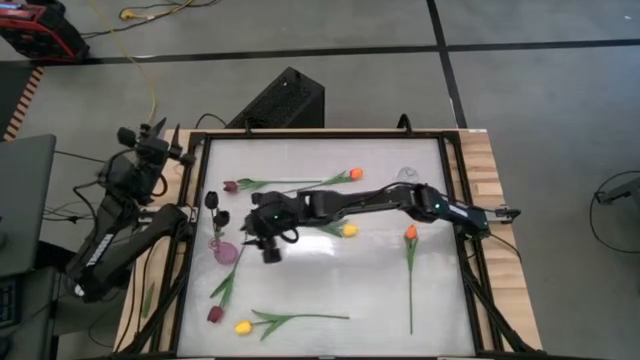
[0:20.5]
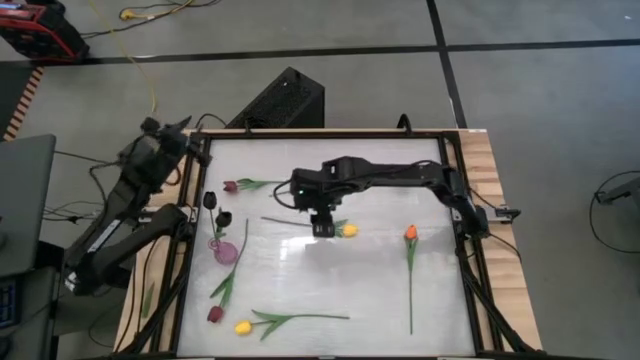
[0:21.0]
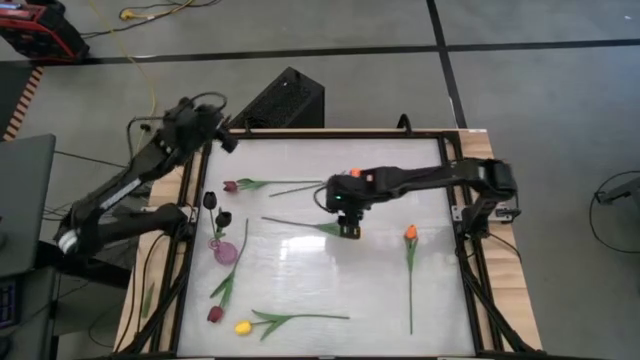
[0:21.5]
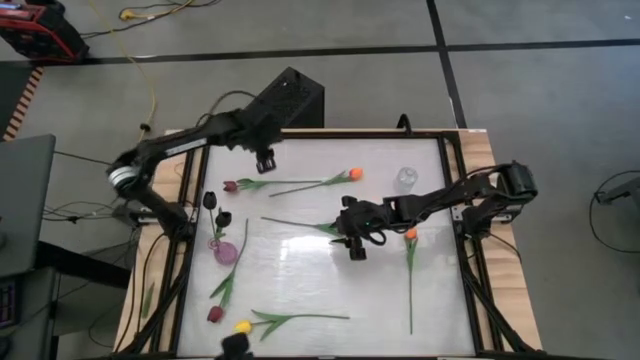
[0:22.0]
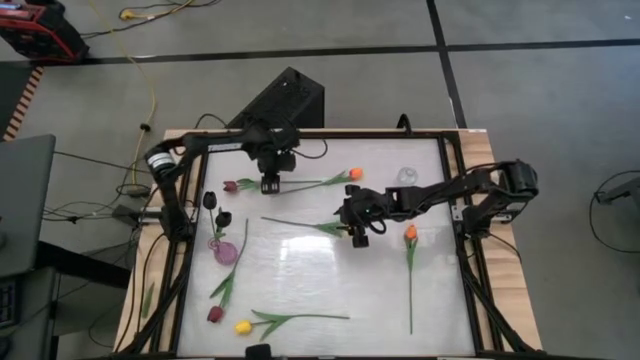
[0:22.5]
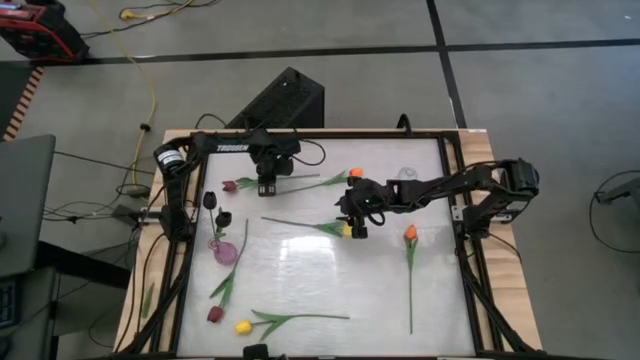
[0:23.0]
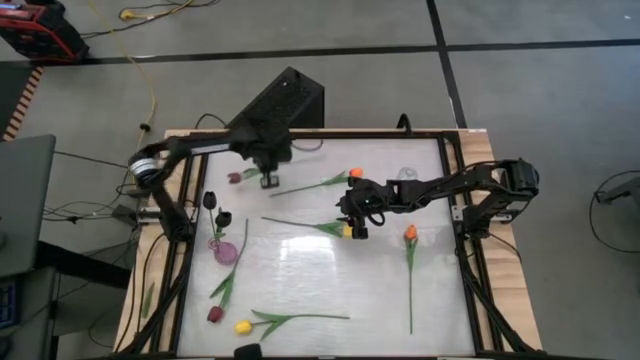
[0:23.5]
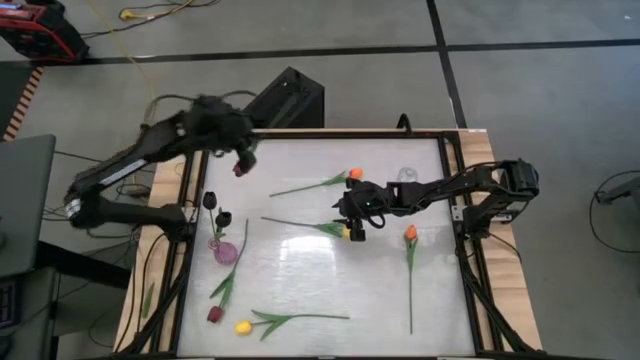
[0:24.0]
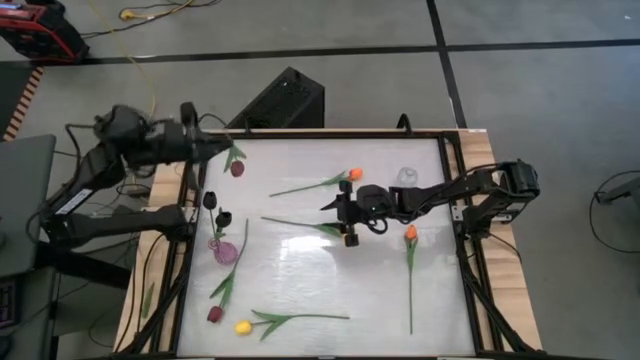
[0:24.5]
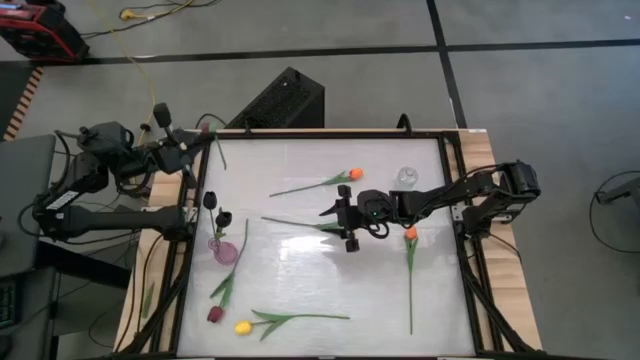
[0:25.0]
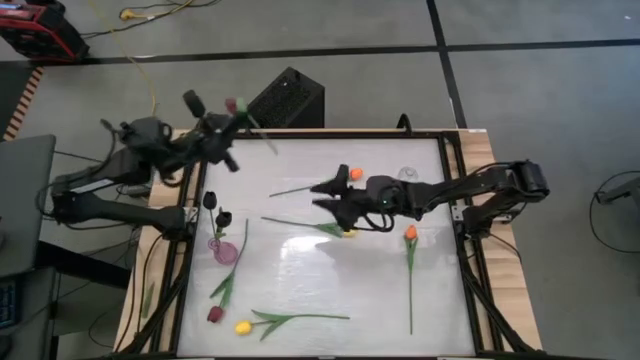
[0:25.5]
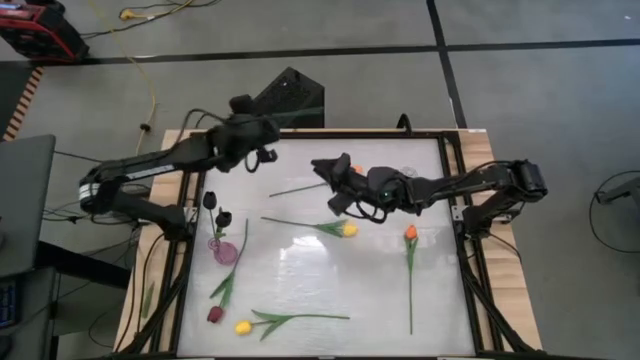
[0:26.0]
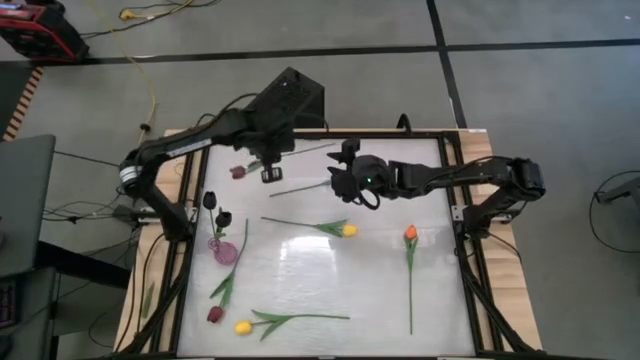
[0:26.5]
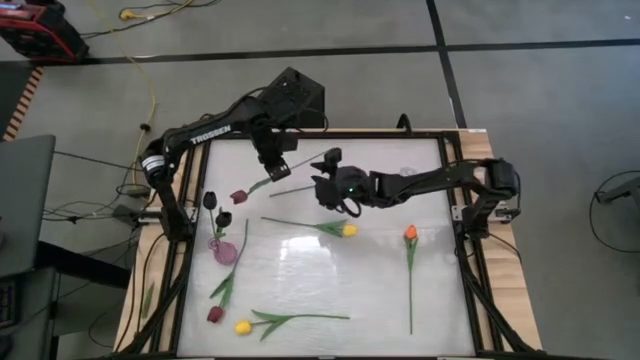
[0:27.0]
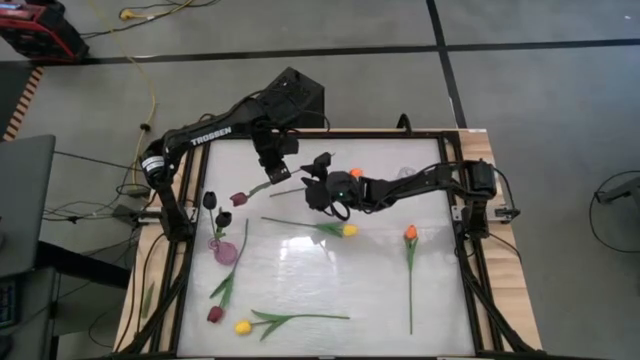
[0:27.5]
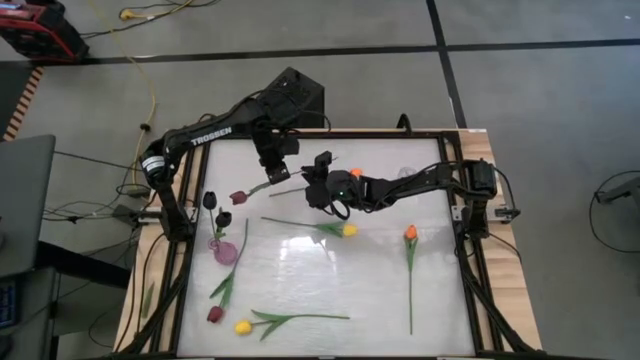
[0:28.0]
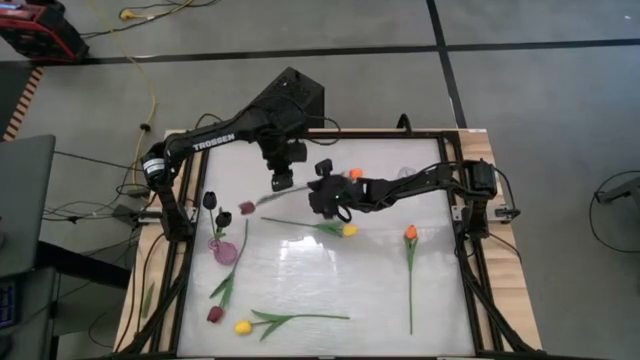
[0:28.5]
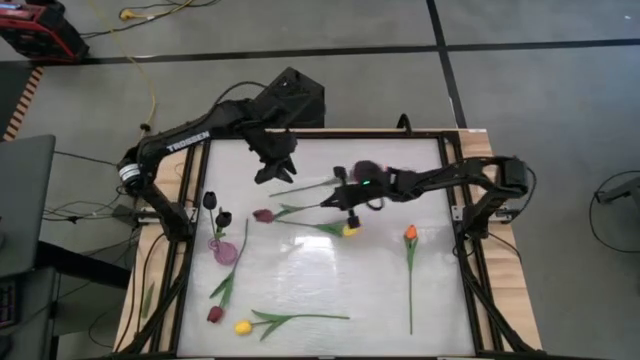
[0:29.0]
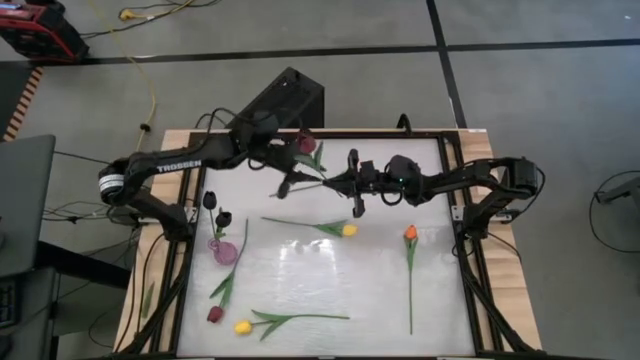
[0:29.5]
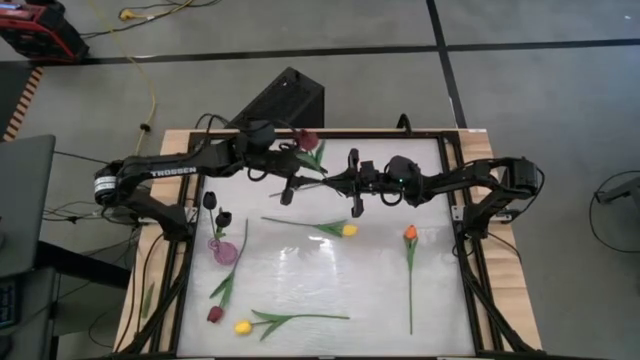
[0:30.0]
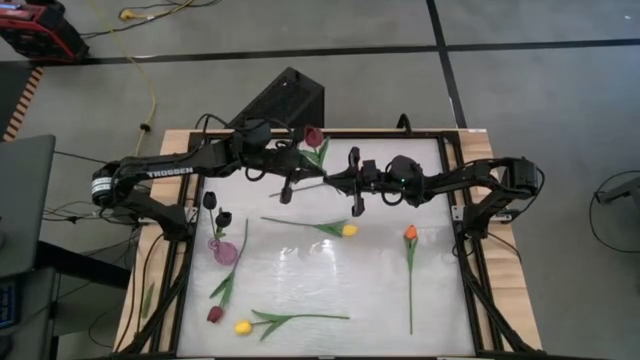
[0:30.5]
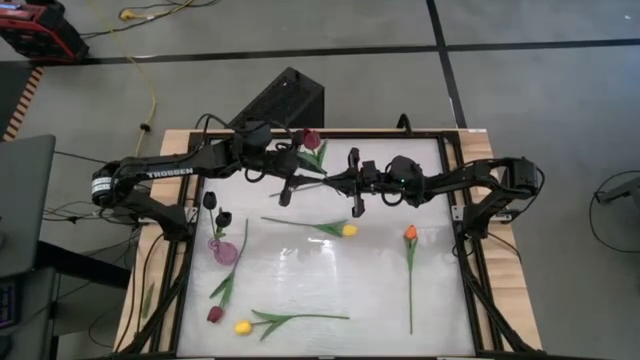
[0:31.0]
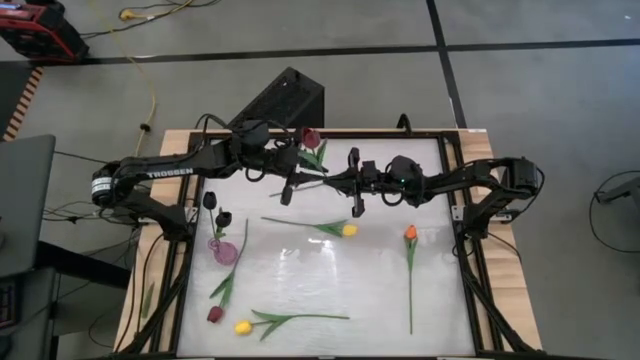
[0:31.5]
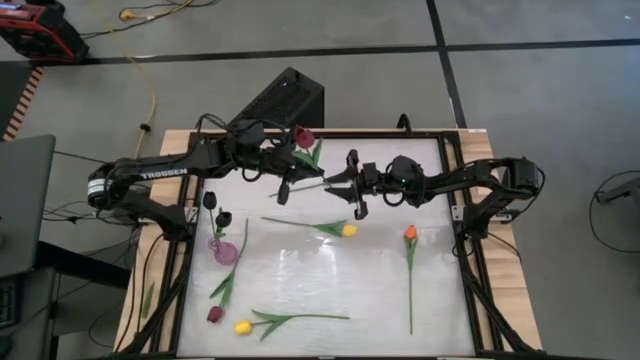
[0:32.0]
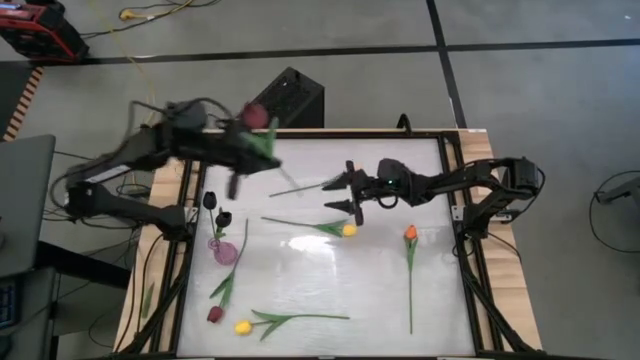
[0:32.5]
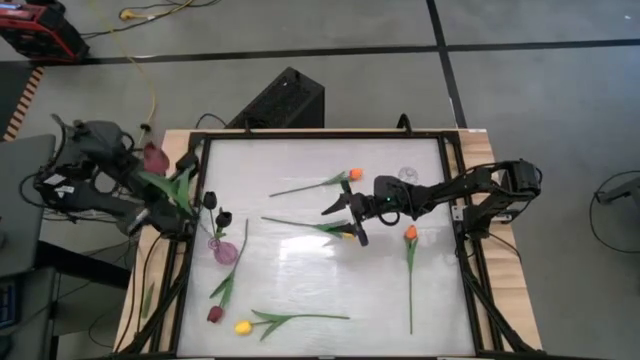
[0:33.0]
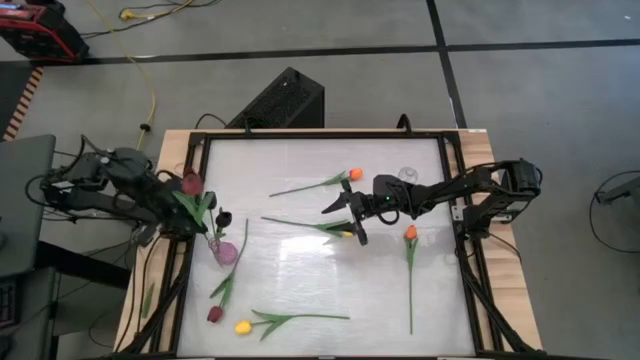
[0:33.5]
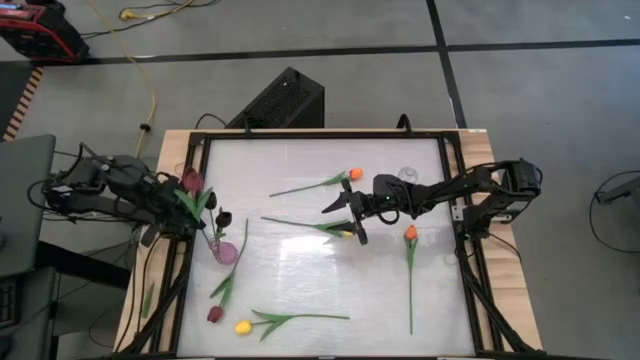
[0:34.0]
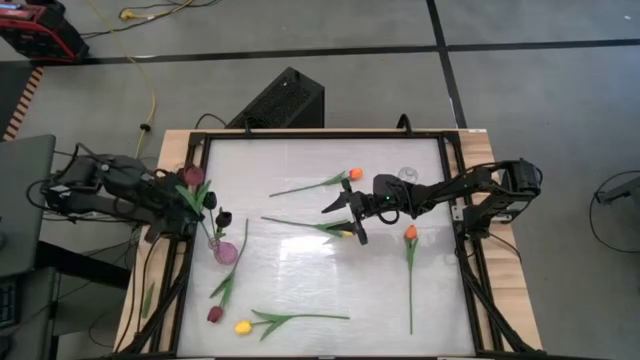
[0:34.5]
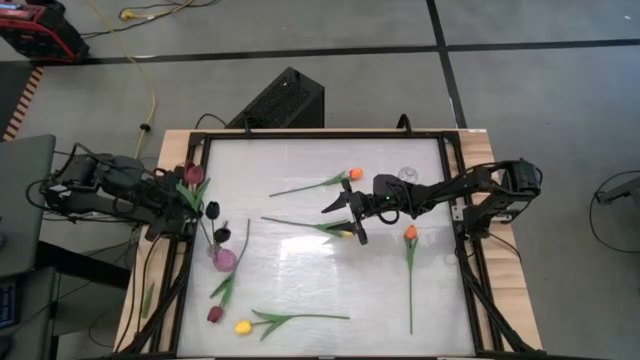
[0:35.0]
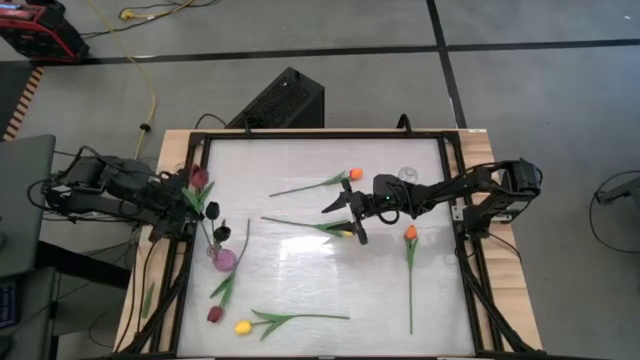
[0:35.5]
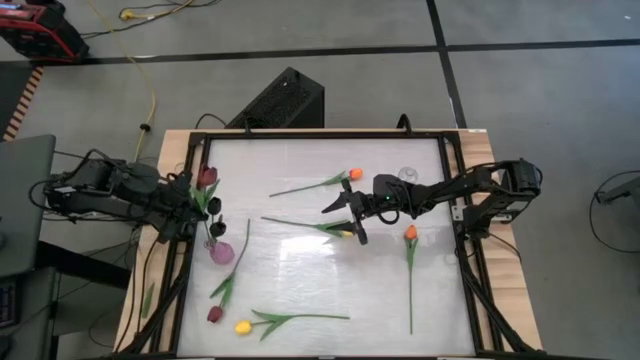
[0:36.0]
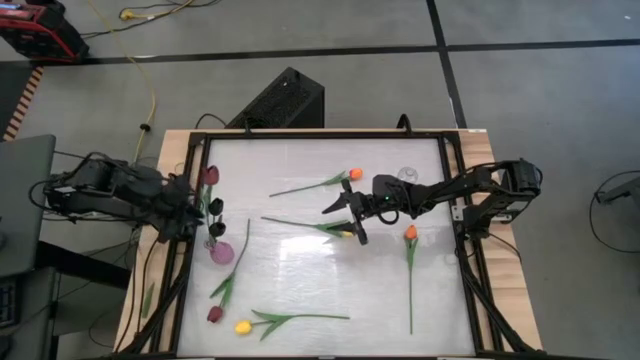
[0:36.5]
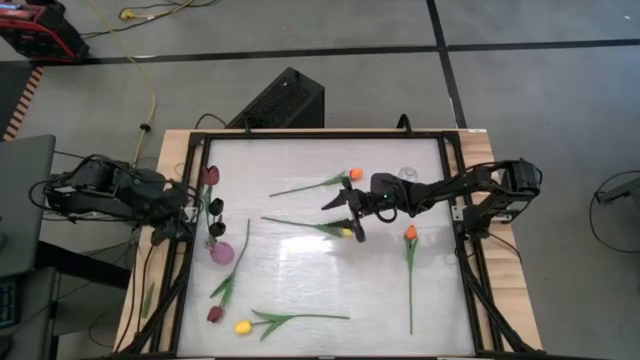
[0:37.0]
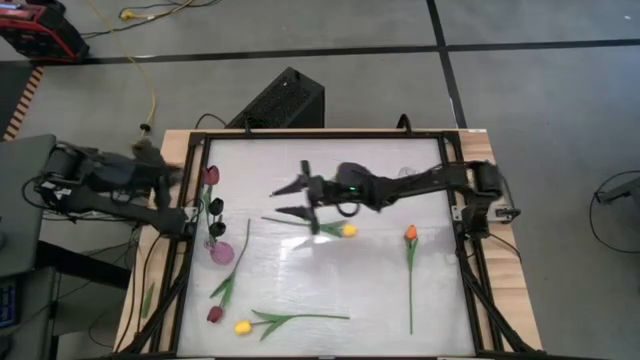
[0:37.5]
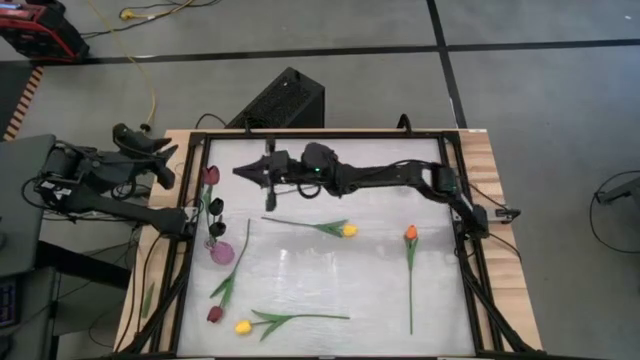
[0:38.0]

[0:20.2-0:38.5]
Task: Sort flowers into vase by color
Put the top red tulip into the purple vase

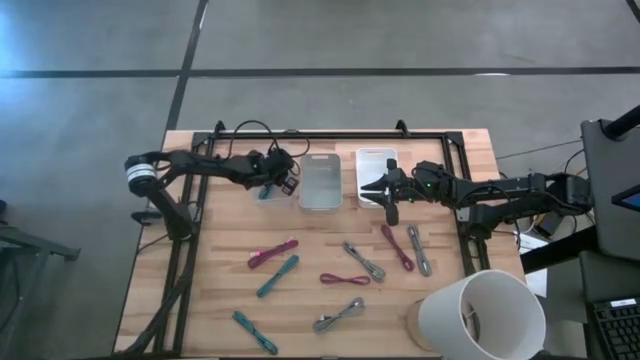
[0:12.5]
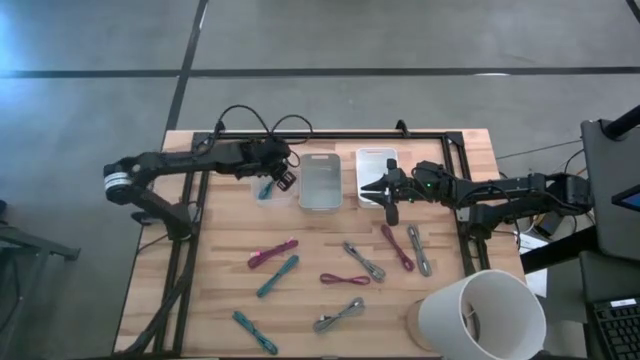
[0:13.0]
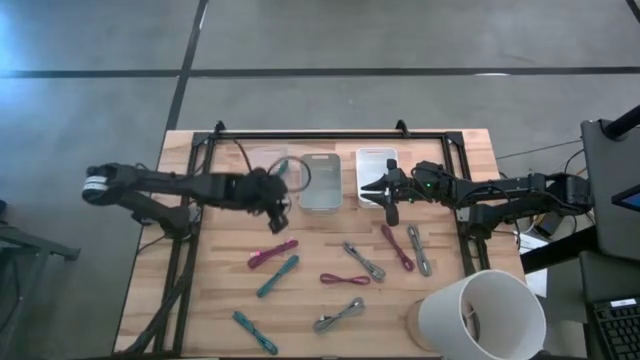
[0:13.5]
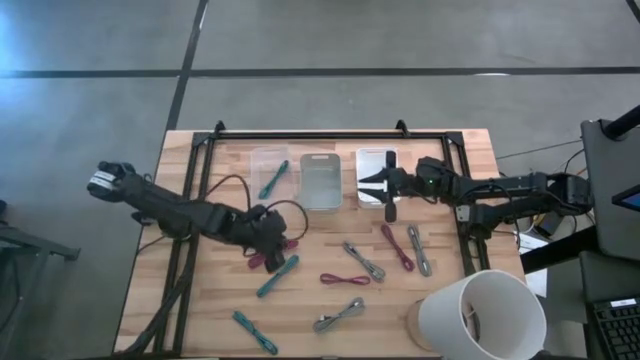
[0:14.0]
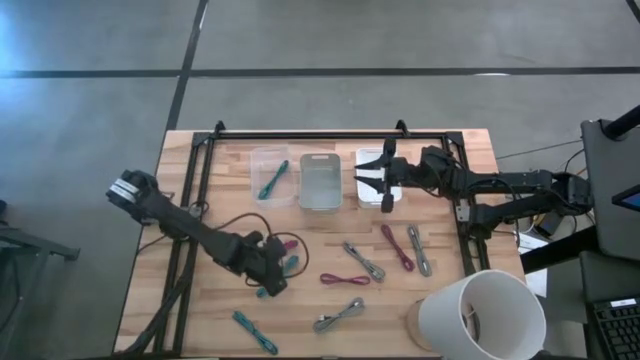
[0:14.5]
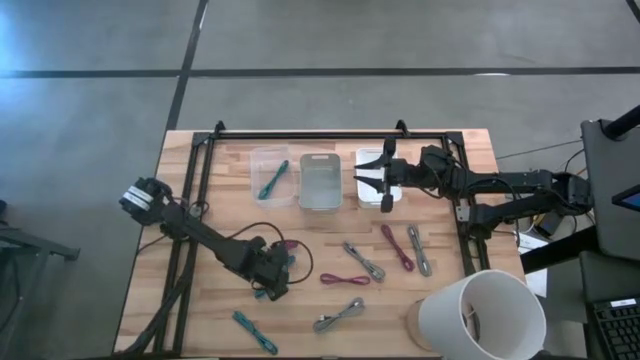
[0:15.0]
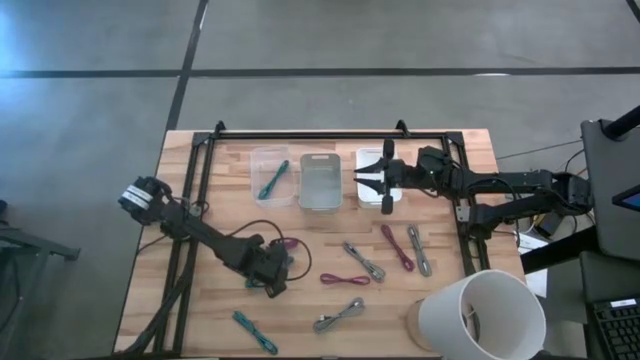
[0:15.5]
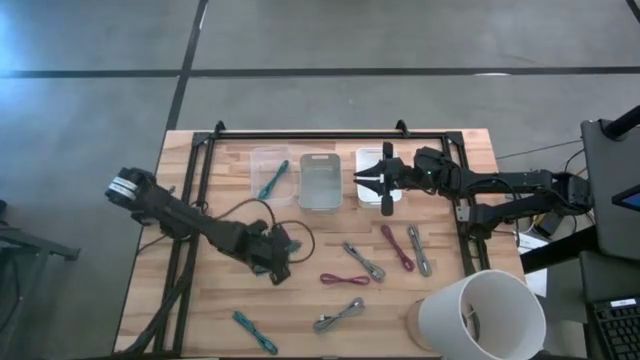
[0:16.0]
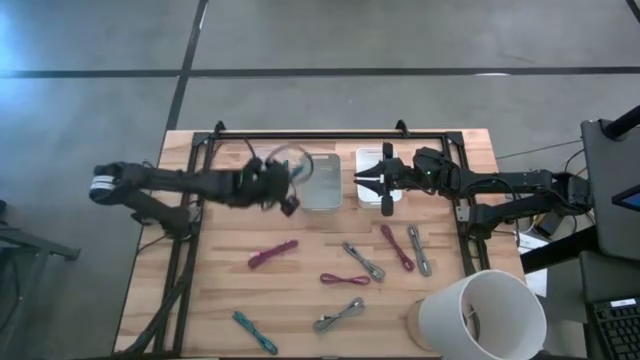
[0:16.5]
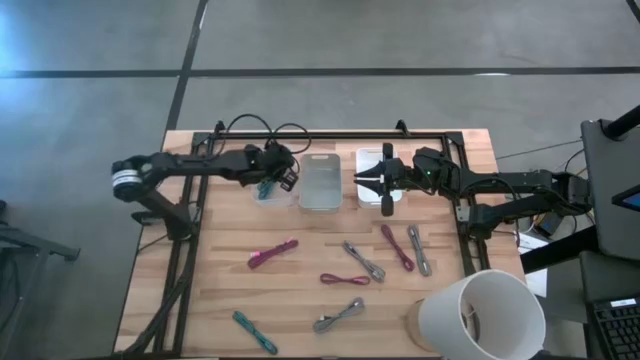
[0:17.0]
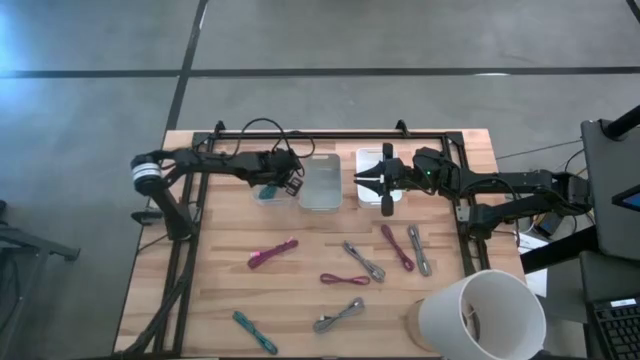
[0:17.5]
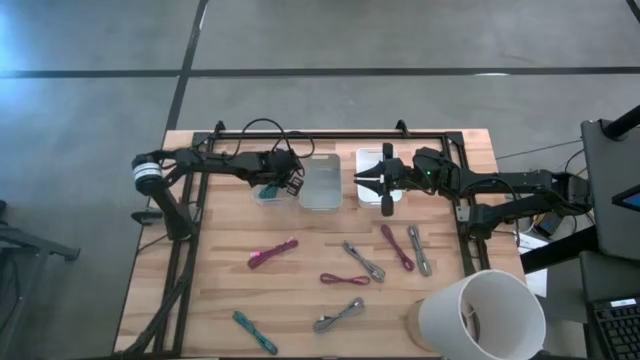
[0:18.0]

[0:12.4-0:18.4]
Task: Pick & Place USB Port
Put the top blue charger cable into the transparent bin
